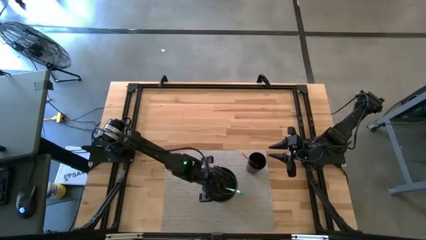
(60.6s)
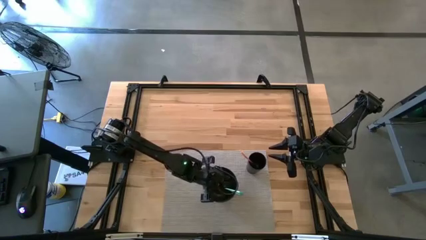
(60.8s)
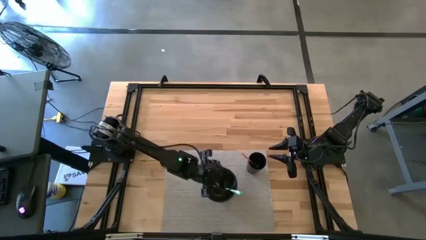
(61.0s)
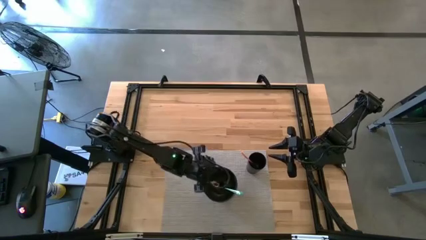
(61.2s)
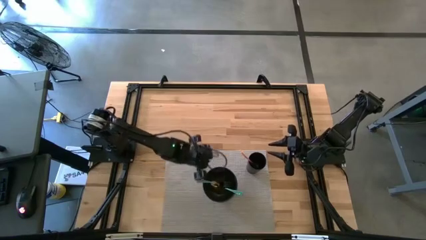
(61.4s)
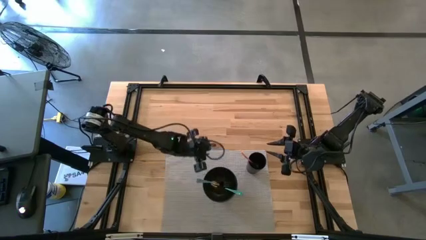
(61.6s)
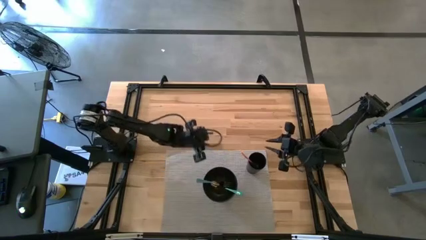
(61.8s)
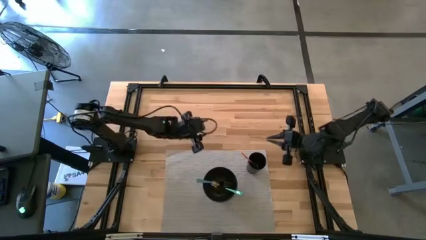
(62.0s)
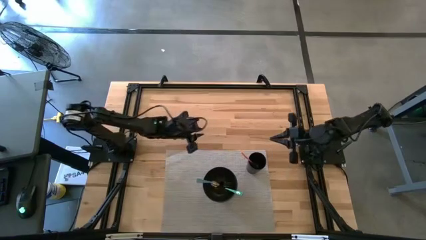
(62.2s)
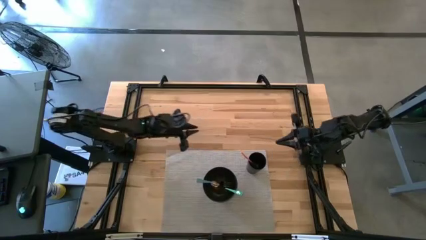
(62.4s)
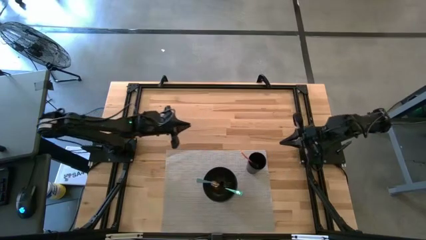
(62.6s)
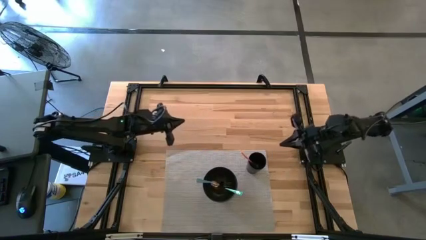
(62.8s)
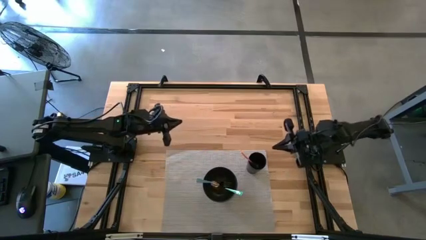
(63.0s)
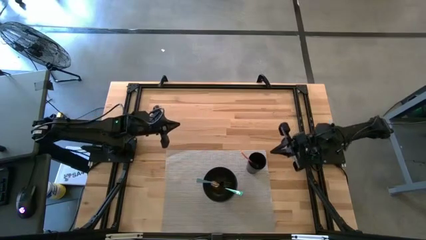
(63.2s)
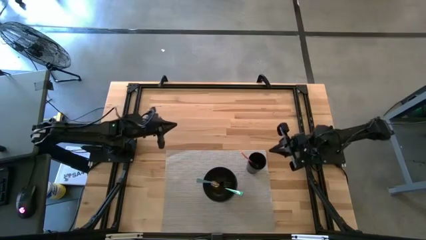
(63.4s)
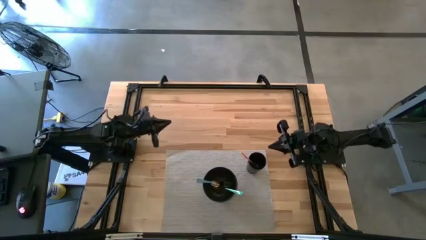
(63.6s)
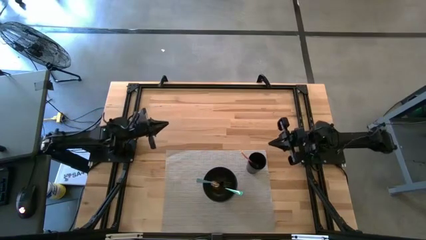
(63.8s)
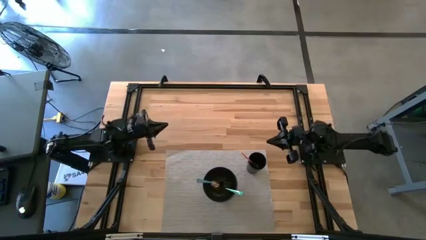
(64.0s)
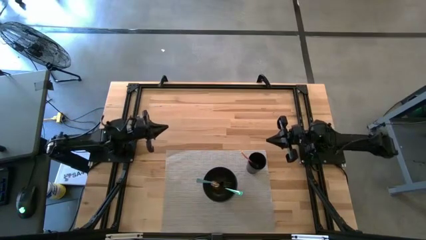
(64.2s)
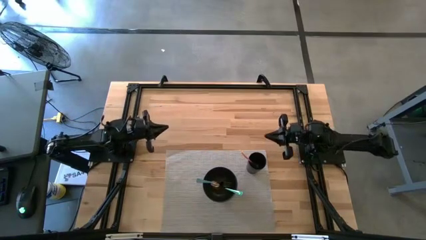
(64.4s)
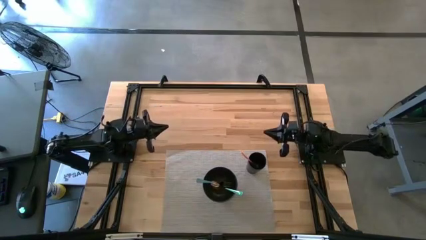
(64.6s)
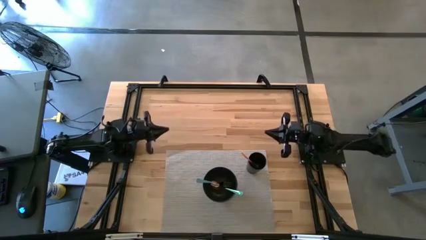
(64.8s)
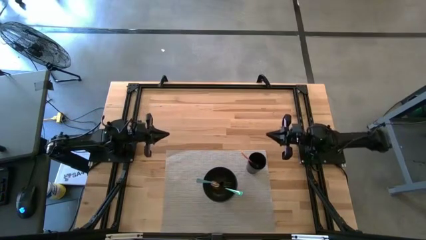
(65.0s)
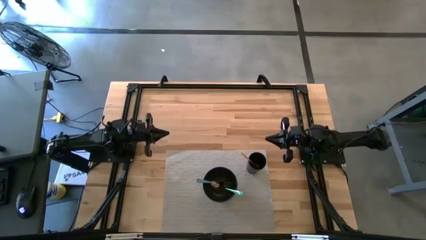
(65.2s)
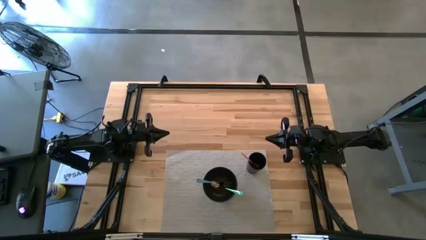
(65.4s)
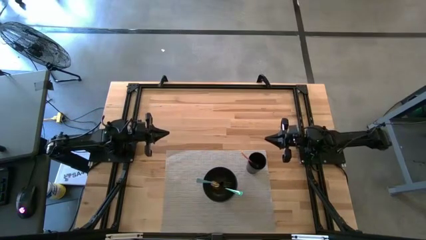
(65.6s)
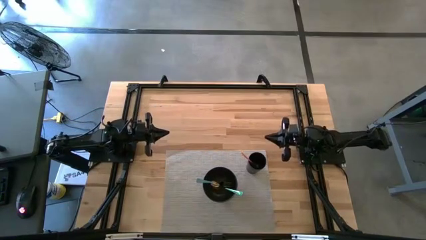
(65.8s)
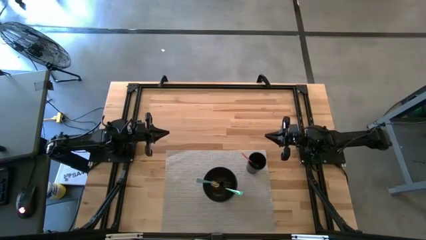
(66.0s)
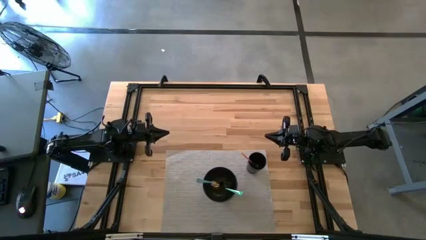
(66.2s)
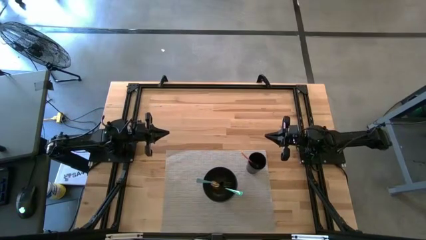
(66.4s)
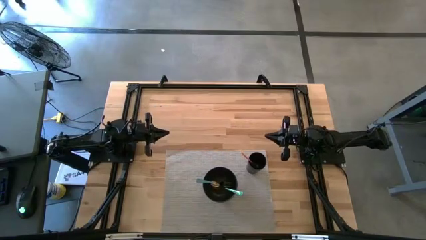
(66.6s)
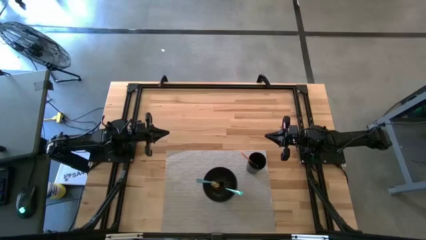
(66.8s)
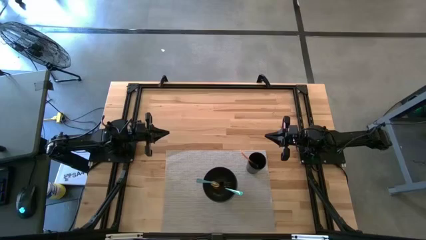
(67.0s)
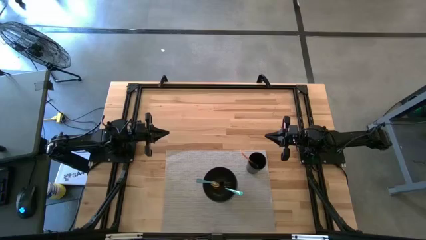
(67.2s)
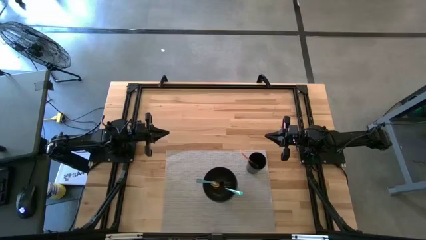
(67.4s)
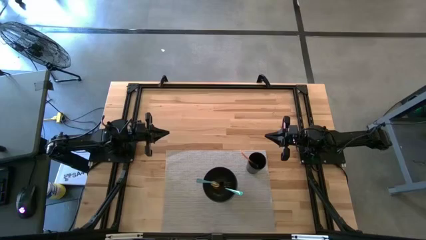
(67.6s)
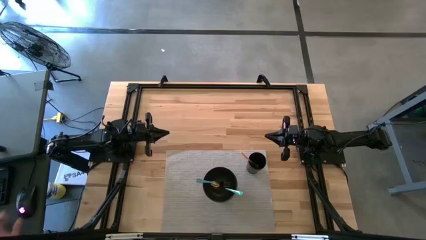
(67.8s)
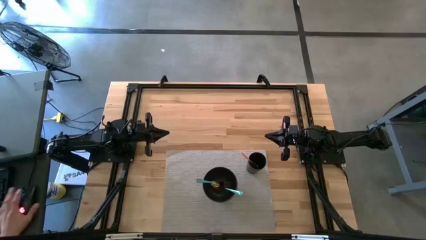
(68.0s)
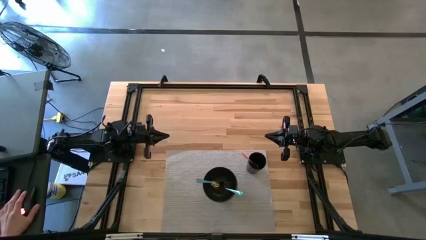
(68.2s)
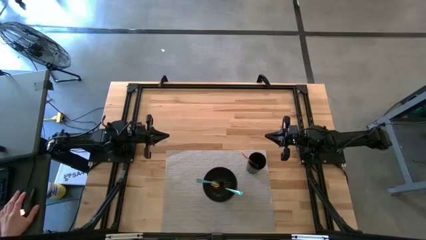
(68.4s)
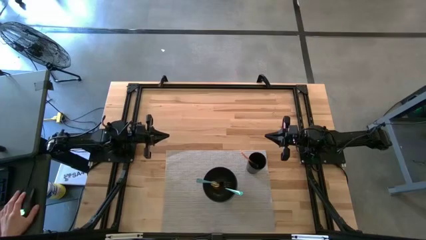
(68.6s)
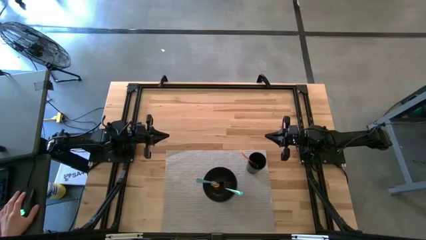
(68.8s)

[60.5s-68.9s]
Task: Pick & Place Utensil
Return to Home Position

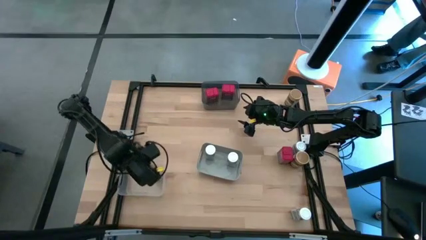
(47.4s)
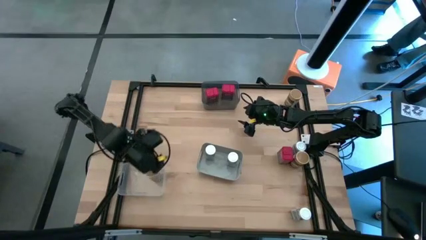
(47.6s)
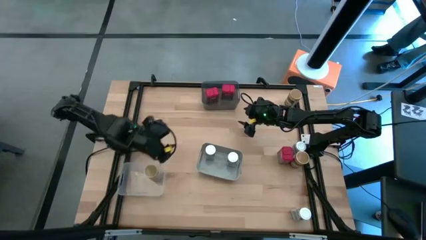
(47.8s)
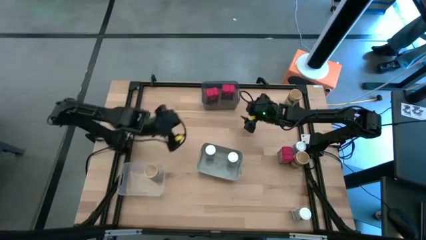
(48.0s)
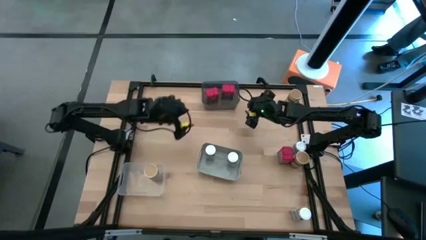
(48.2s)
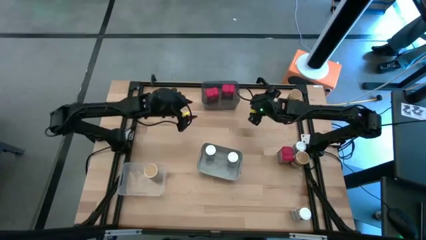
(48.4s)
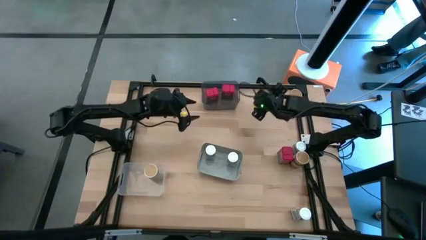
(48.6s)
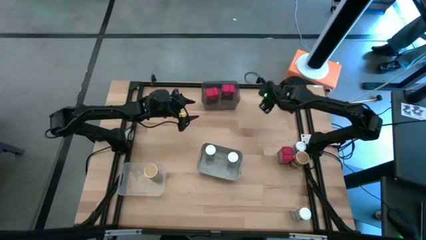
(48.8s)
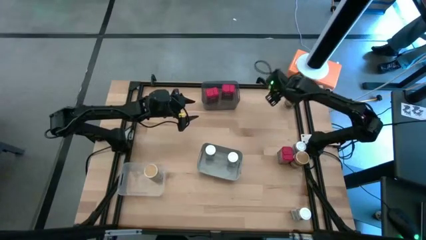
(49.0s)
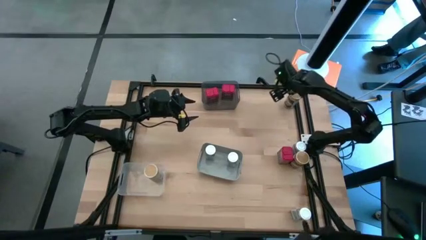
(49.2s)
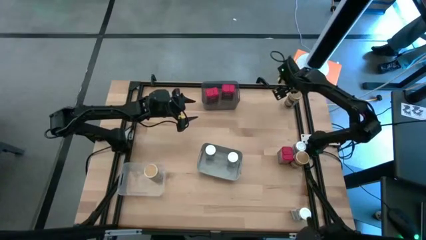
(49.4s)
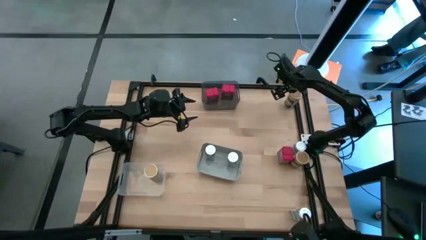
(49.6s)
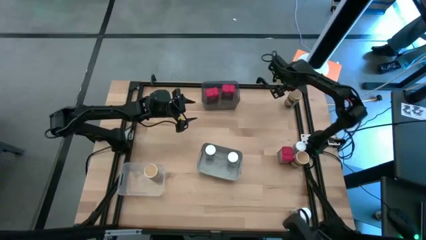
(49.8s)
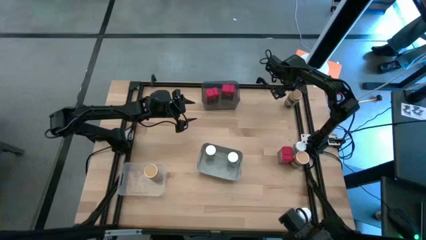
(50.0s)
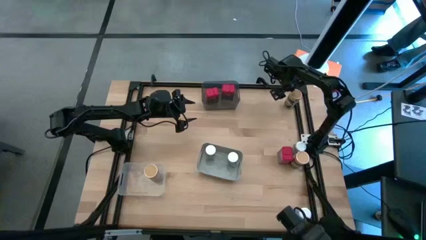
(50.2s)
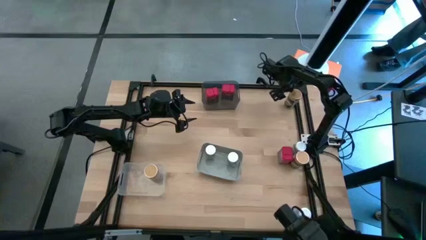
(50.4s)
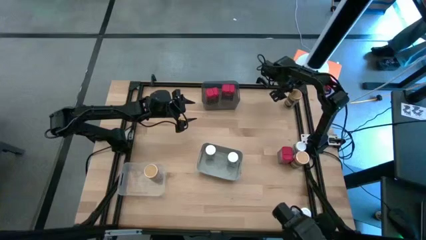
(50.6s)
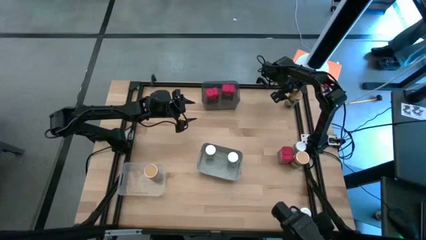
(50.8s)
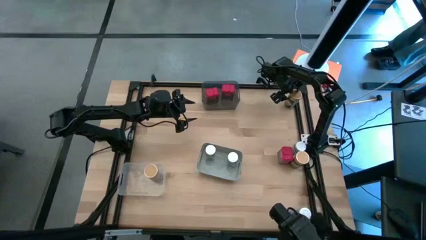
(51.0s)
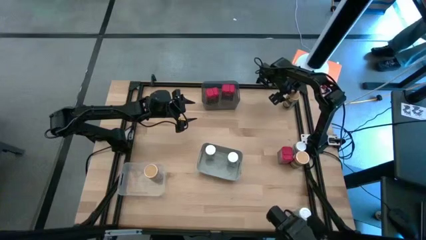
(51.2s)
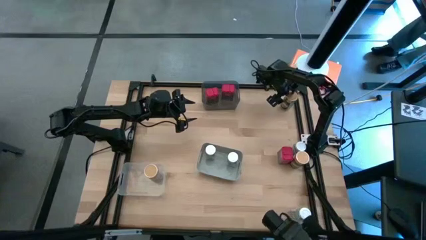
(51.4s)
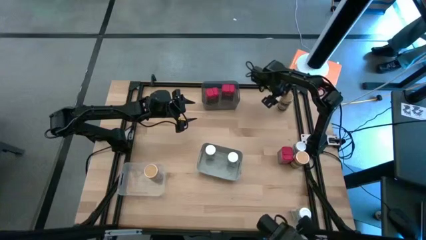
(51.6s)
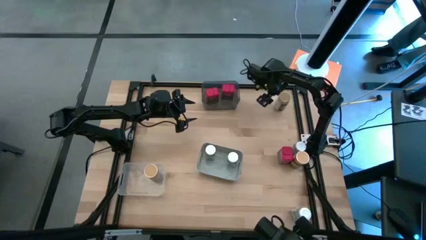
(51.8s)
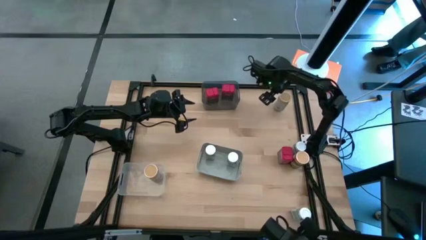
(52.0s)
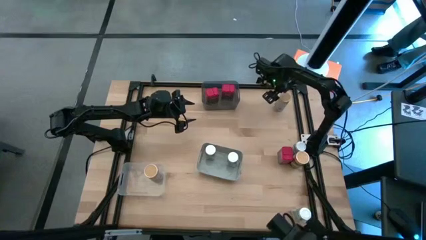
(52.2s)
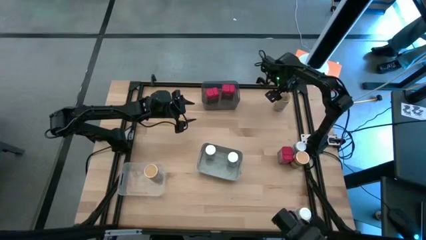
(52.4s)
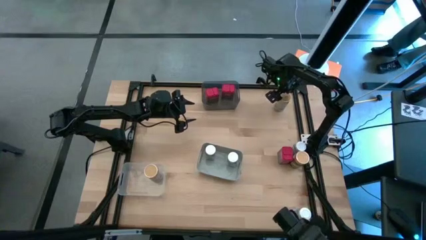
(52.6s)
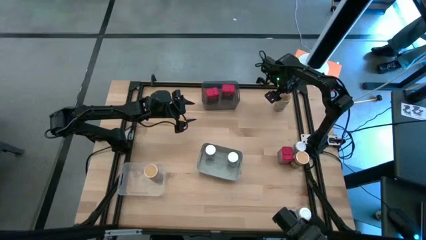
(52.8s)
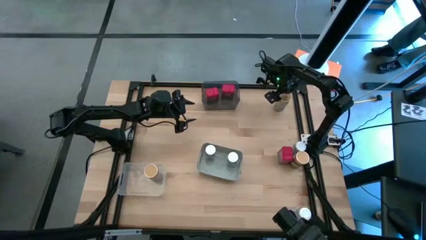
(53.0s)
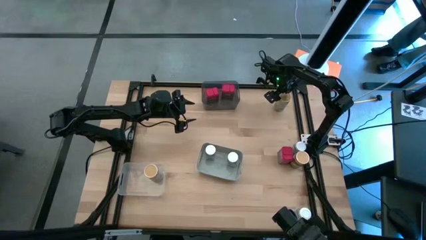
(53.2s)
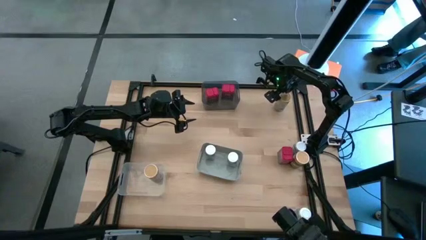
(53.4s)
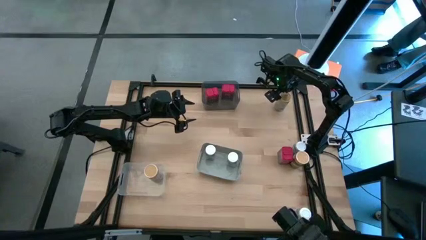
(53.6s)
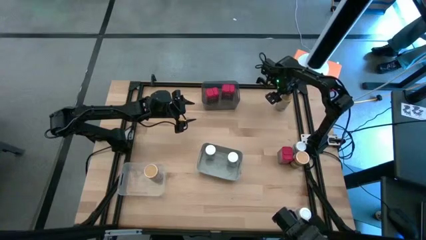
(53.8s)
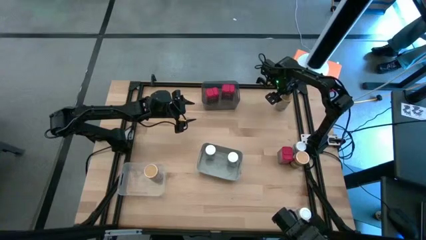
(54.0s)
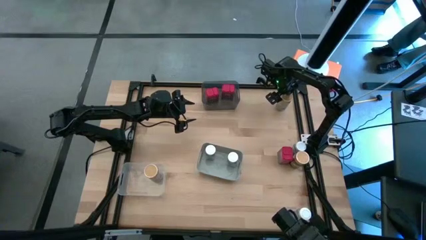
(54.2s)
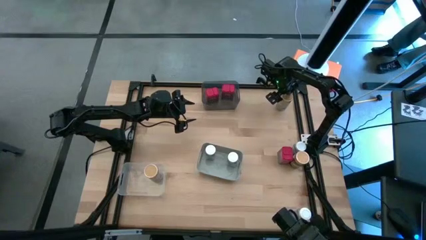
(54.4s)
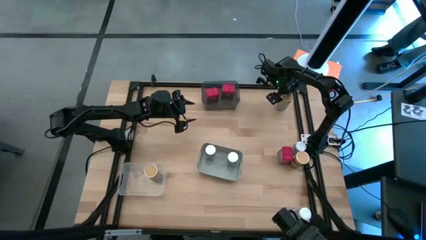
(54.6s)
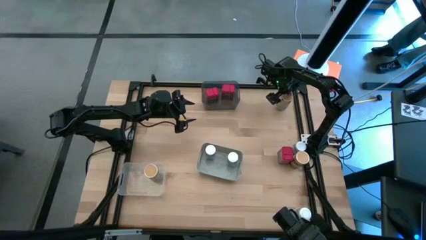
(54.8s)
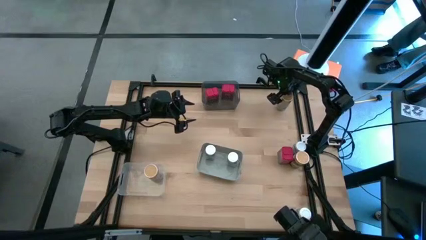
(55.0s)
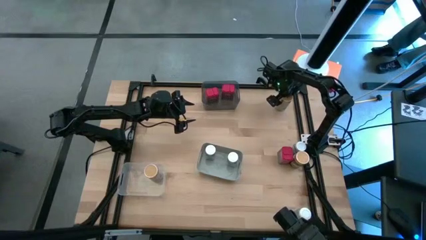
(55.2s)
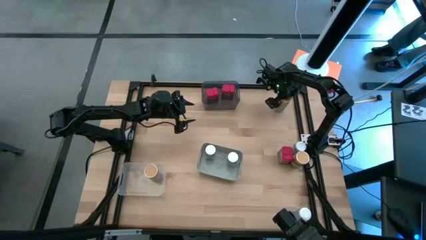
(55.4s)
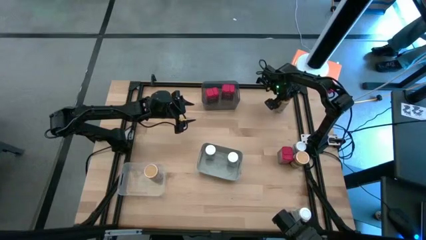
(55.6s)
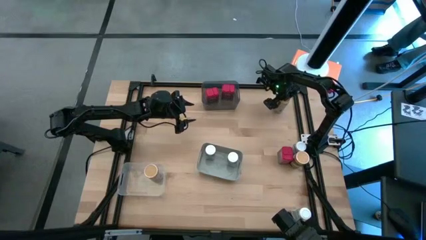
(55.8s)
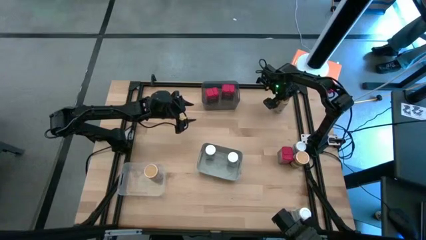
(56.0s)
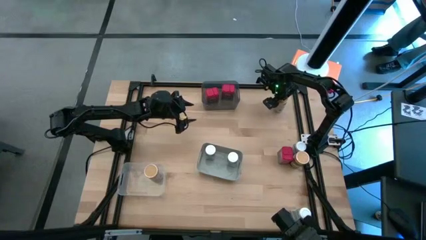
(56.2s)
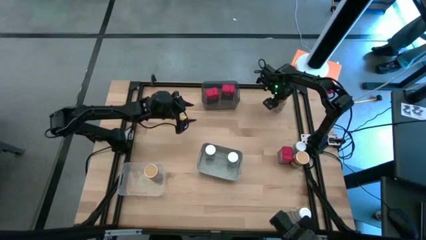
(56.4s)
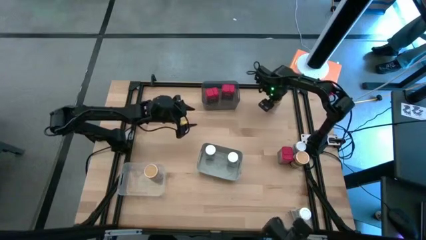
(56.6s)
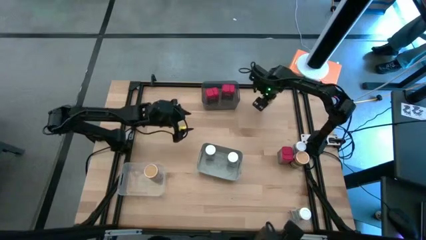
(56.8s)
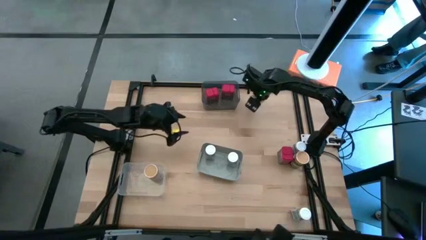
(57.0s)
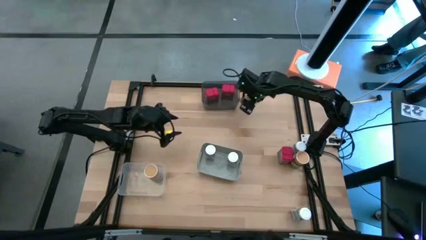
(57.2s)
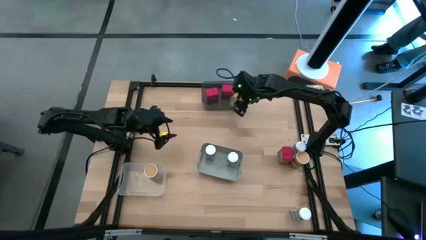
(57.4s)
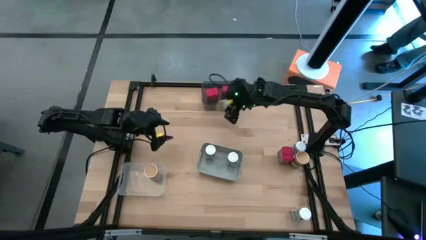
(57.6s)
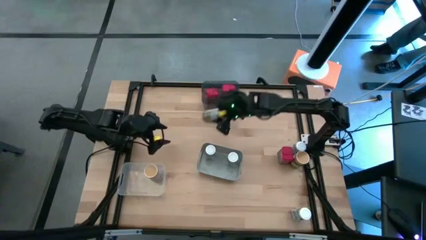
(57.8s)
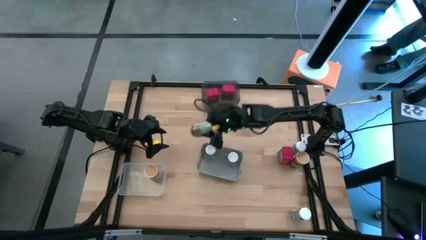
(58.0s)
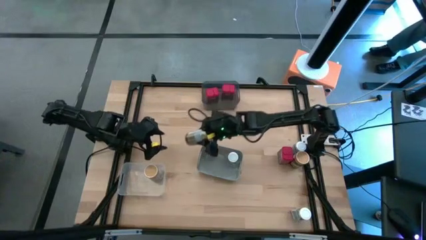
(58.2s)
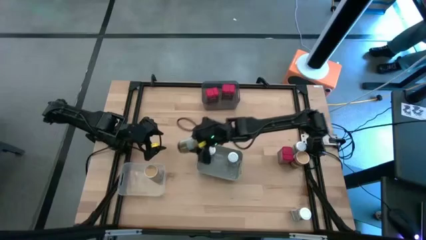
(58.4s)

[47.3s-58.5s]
Task: Sort spices by type
Put the top brown seasoning bottle into the transparent bin
